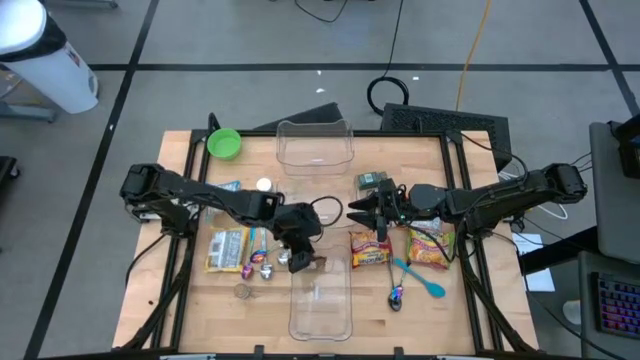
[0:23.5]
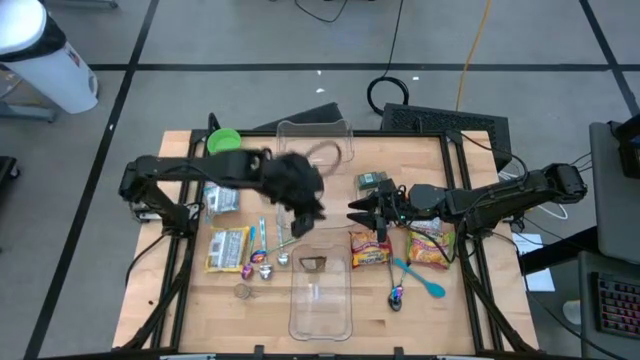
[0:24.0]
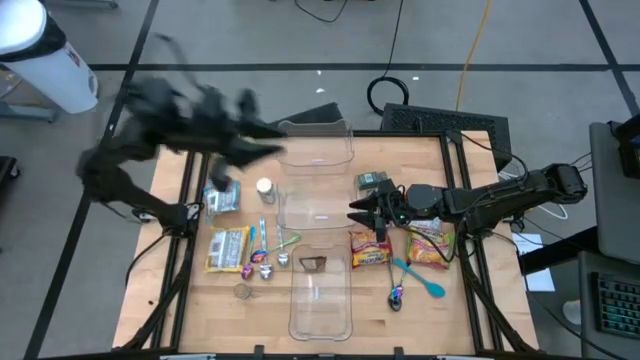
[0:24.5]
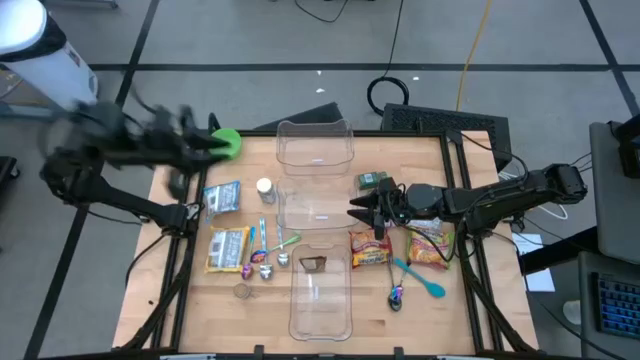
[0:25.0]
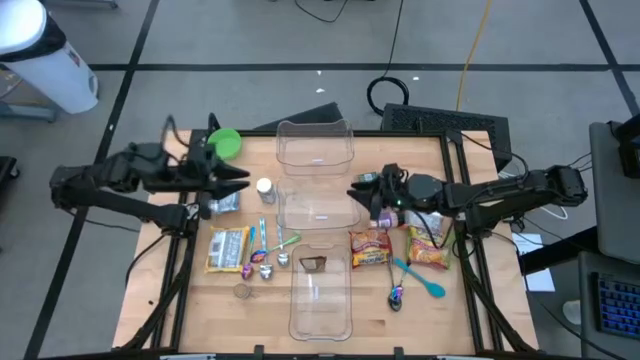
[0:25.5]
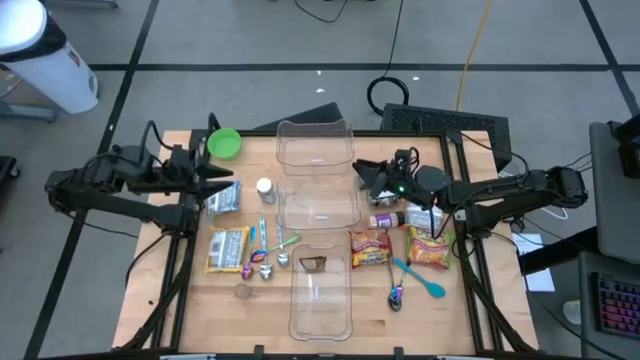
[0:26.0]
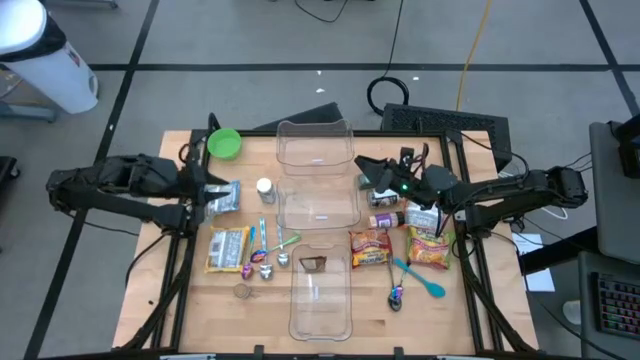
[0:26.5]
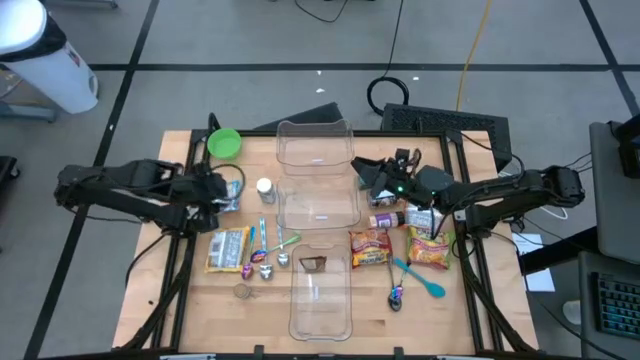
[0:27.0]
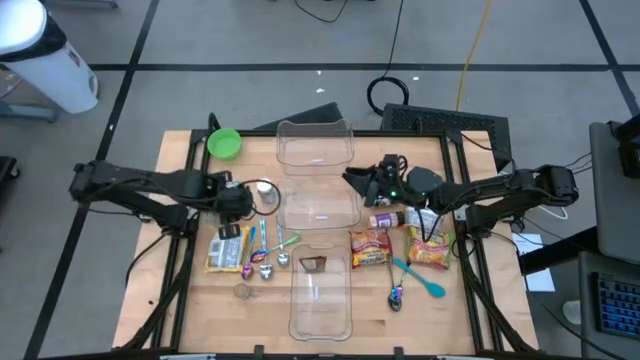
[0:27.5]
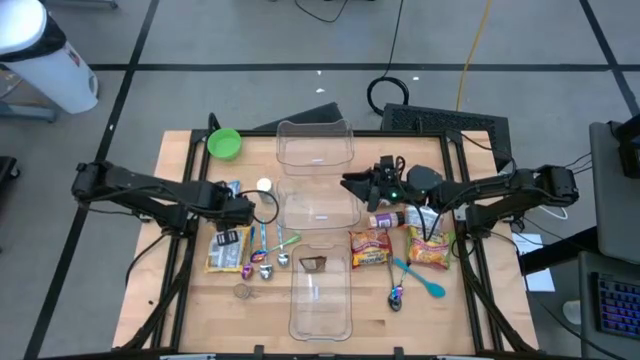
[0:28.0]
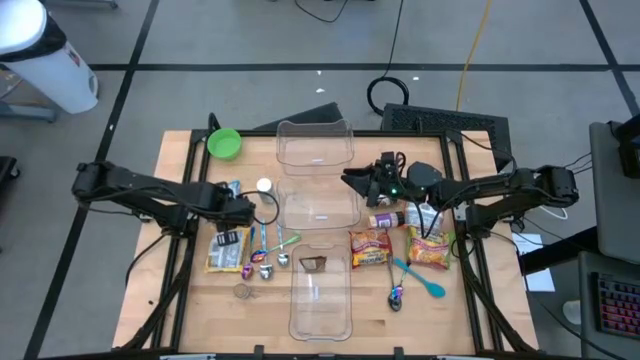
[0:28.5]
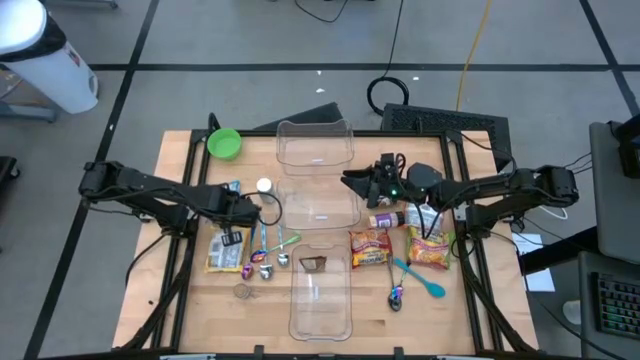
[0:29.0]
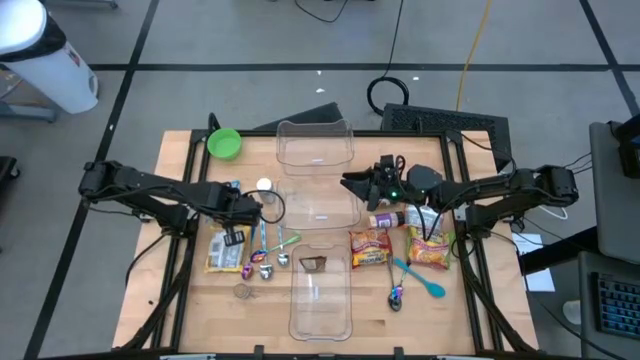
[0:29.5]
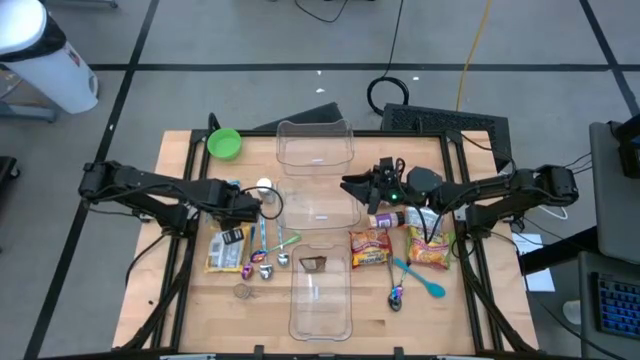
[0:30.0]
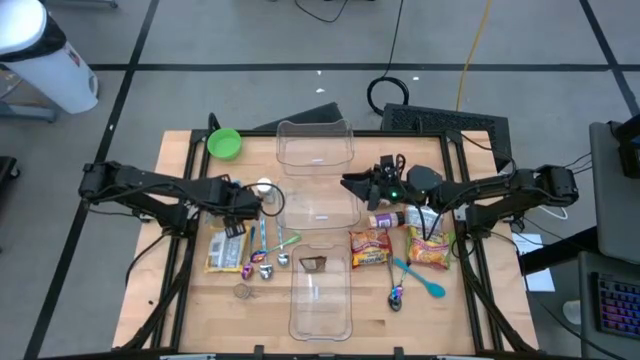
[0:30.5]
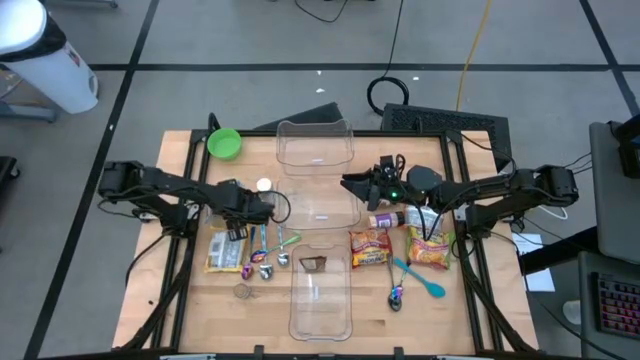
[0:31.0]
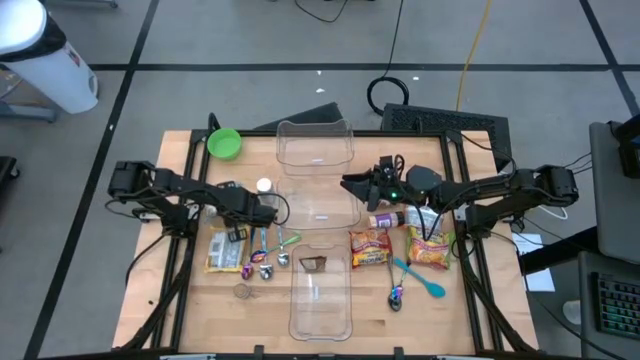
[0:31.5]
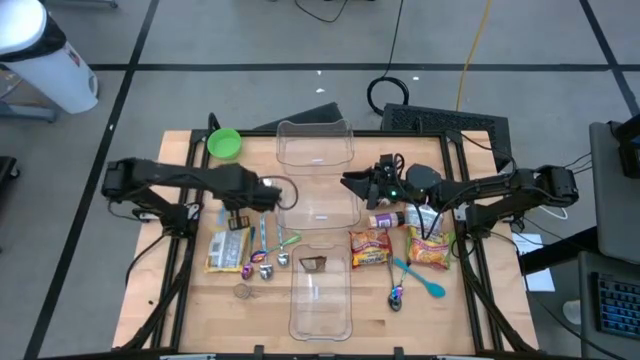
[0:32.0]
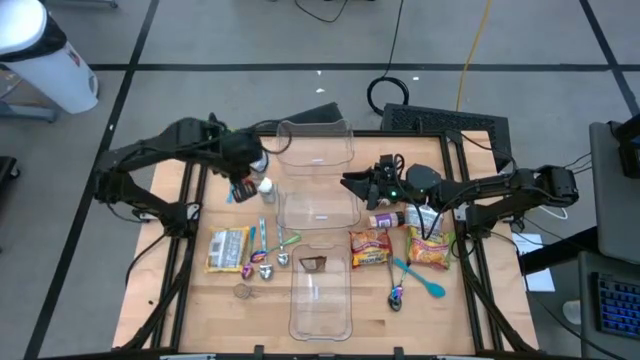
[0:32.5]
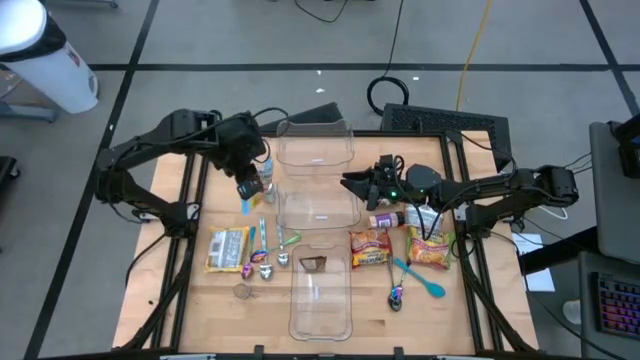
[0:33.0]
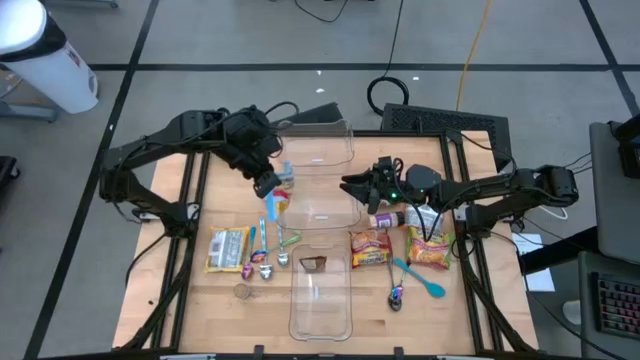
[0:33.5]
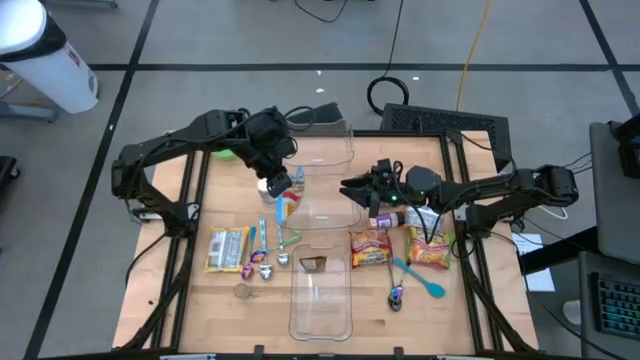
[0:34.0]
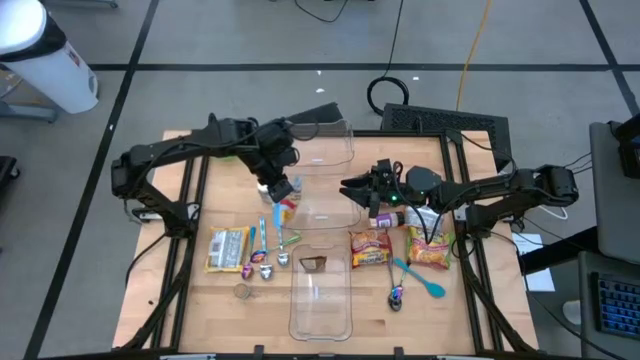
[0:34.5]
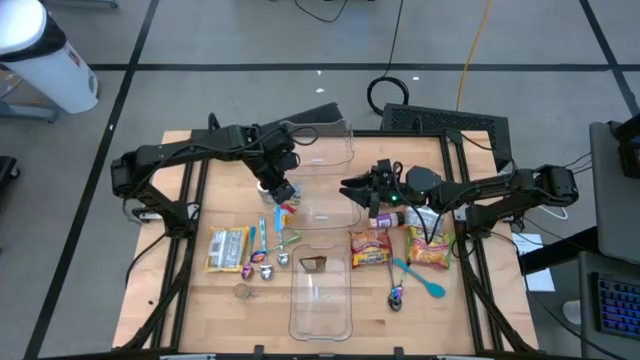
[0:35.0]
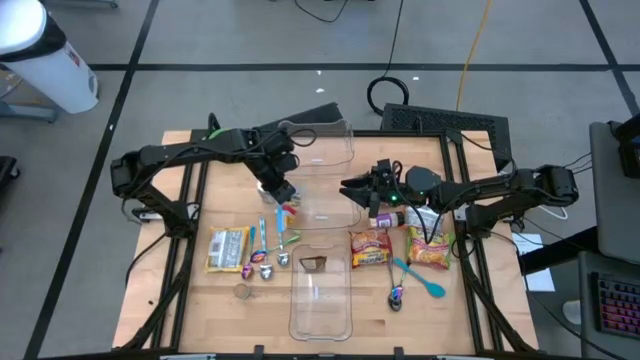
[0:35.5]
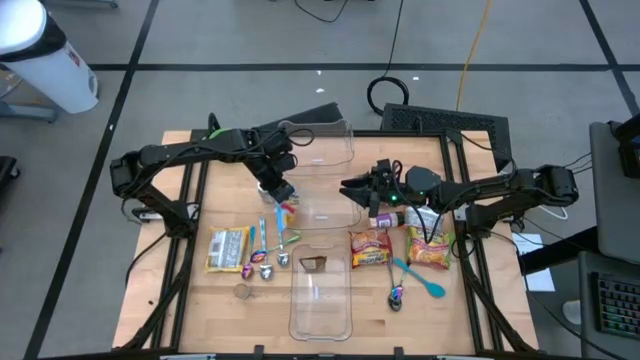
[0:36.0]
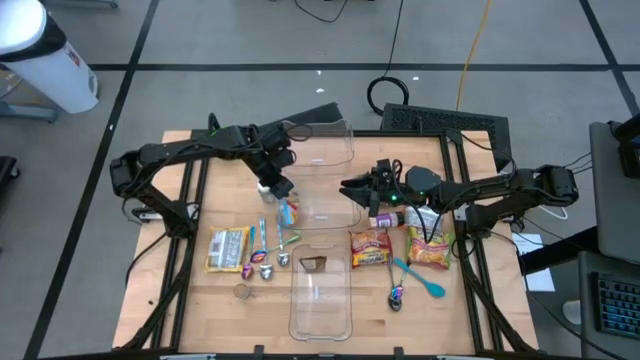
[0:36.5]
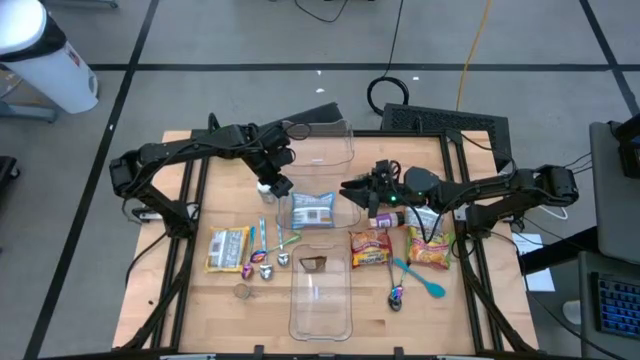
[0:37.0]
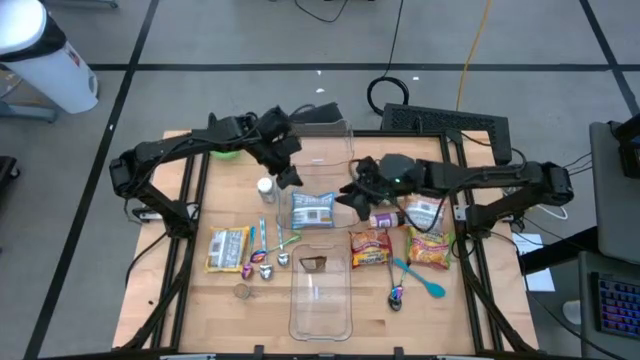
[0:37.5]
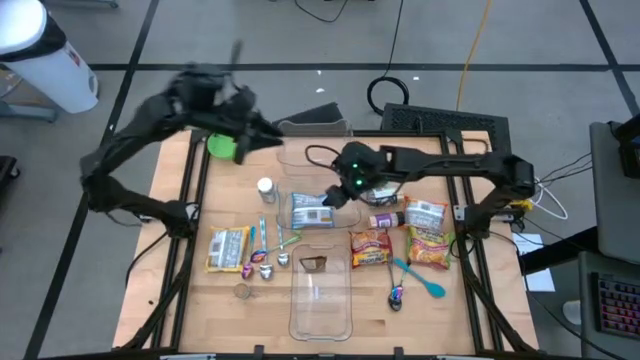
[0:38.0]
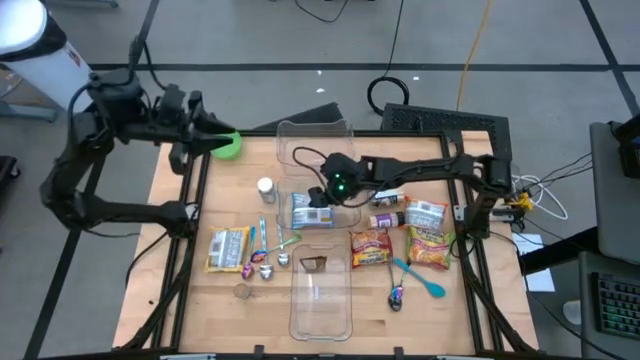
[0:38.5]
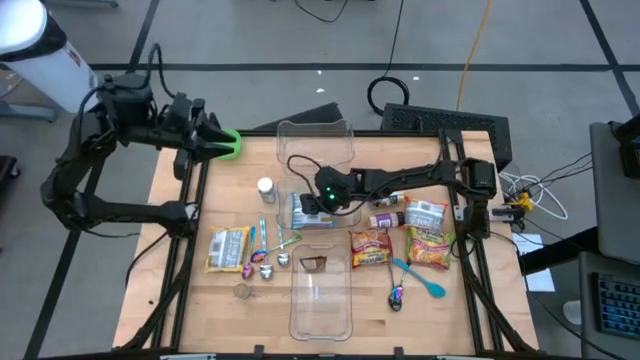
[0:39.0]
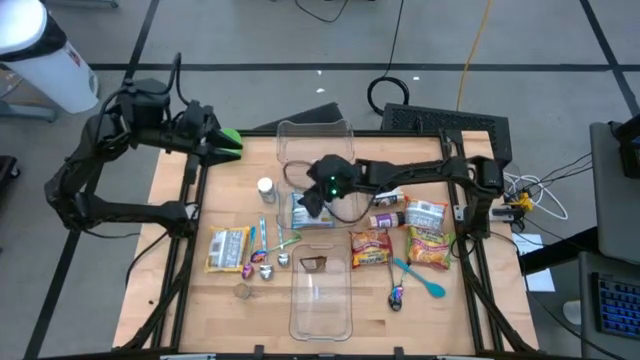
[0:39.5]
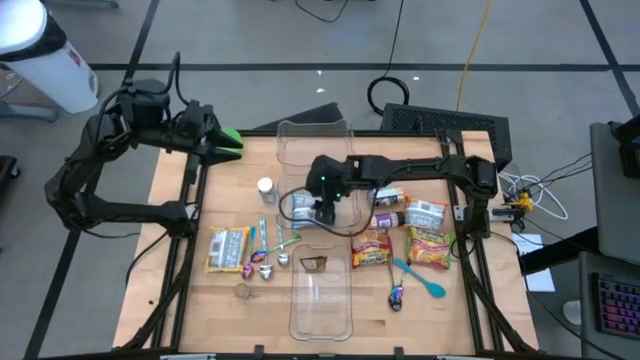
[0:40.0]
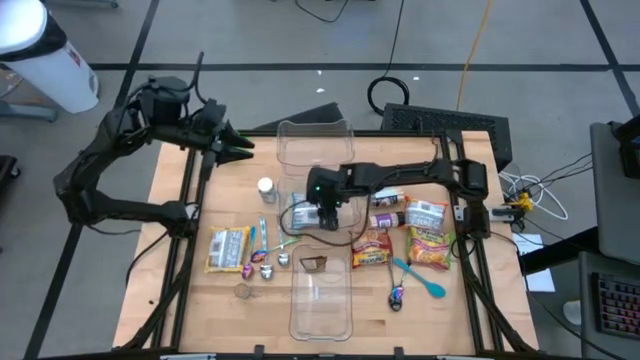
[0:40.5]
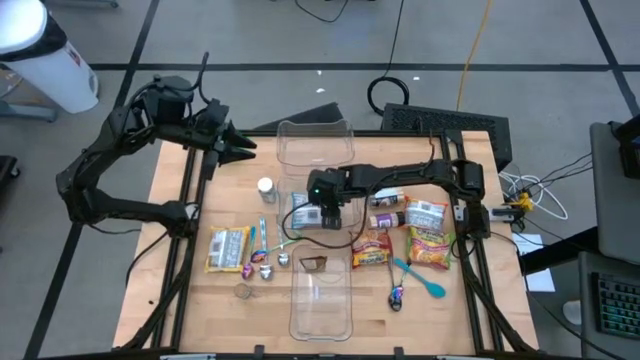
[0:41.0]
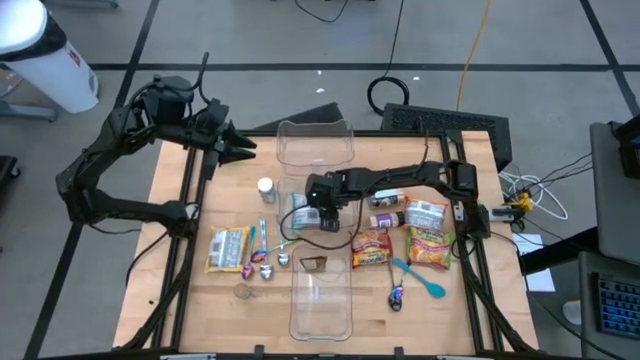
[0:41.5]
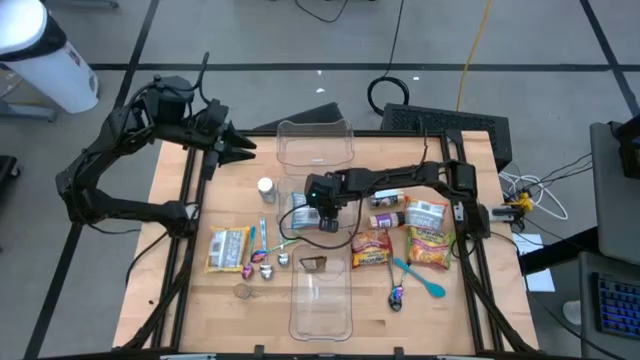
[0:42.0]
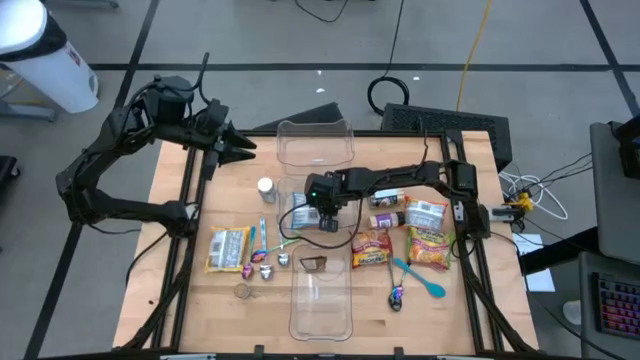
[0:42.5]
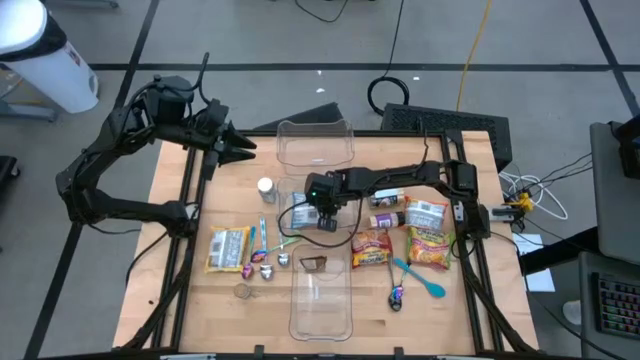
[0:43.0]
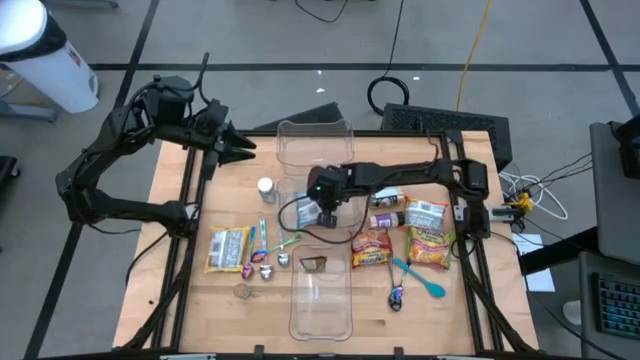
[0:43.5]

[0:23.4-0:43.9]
Task: Pick & Place Food Item
Put the blue noodle pack into the middle transparent bin
